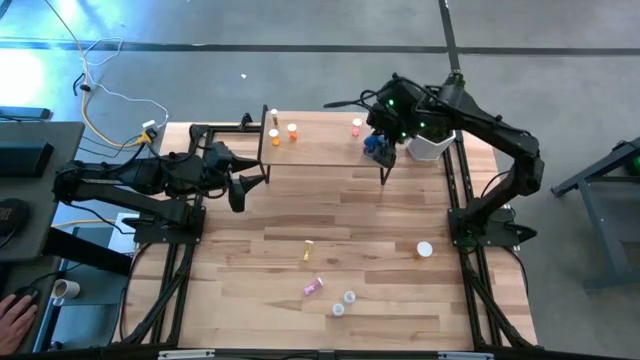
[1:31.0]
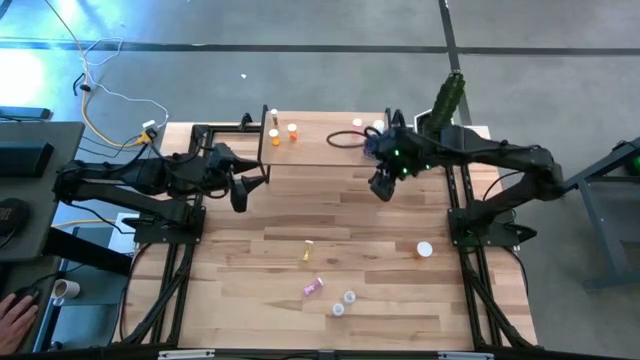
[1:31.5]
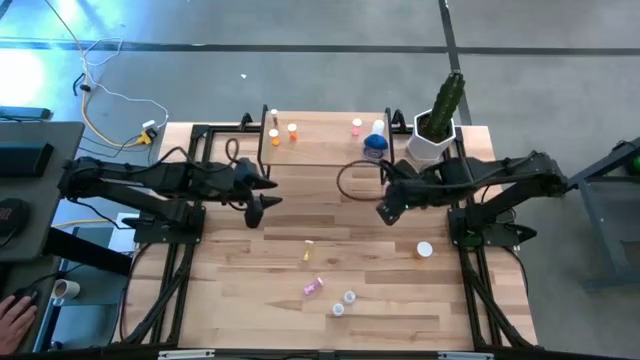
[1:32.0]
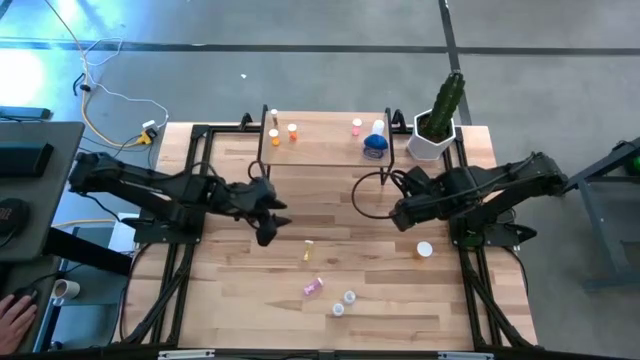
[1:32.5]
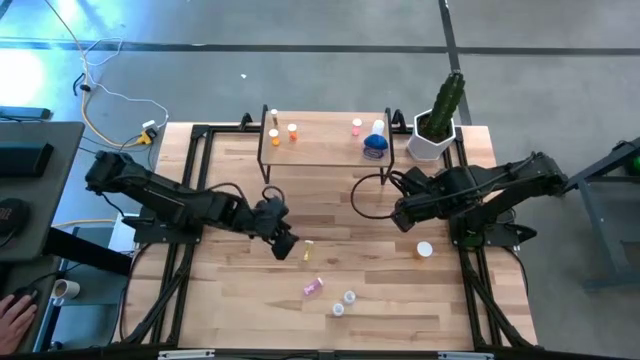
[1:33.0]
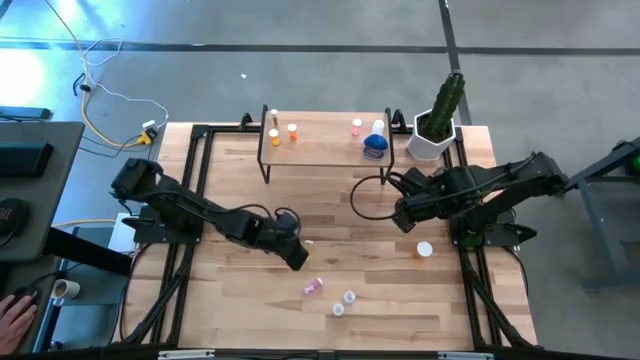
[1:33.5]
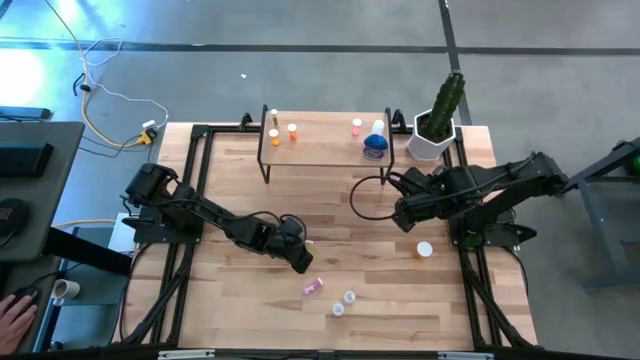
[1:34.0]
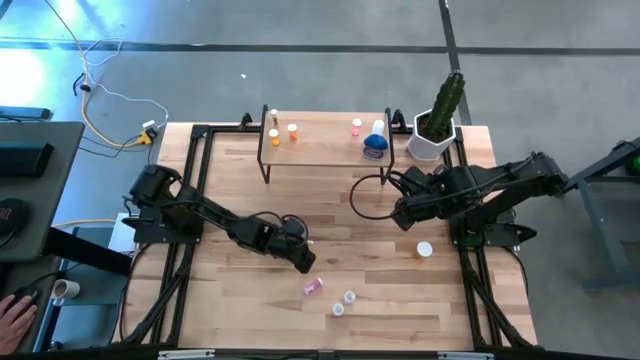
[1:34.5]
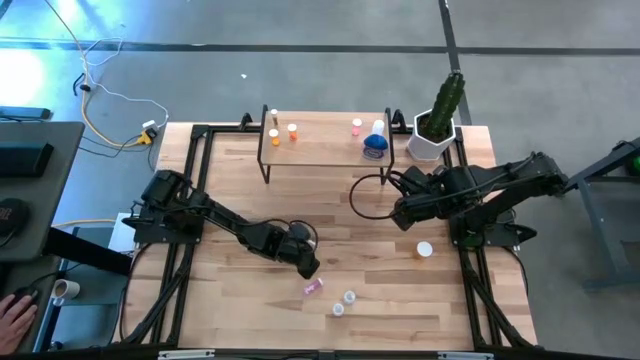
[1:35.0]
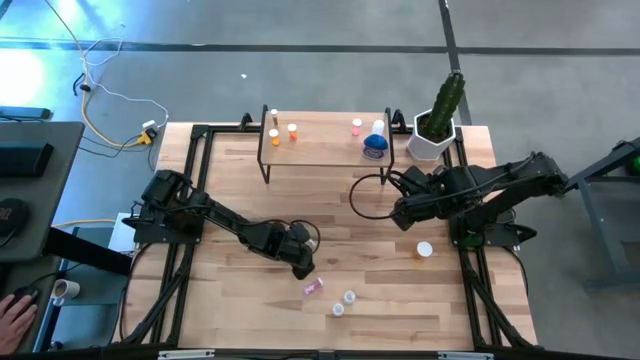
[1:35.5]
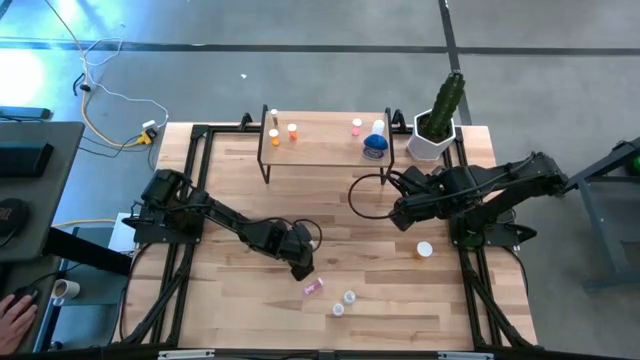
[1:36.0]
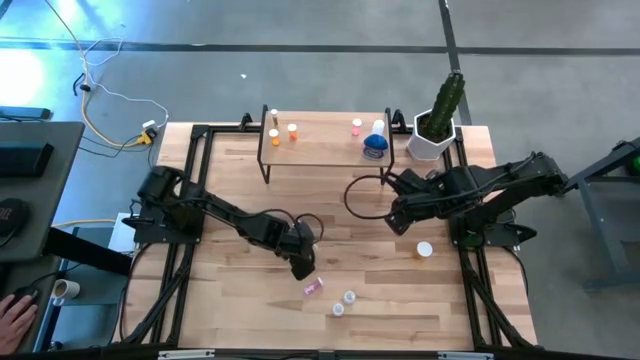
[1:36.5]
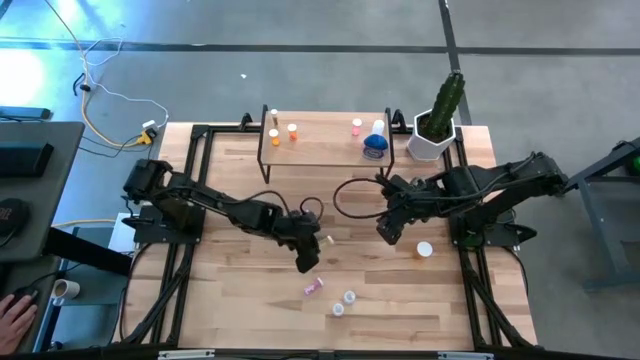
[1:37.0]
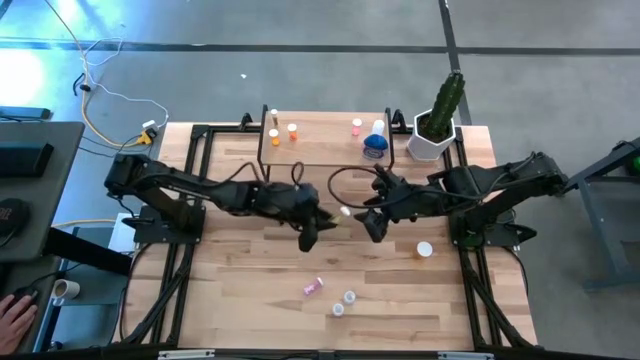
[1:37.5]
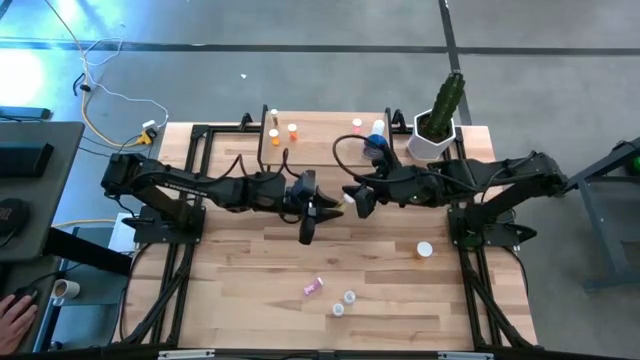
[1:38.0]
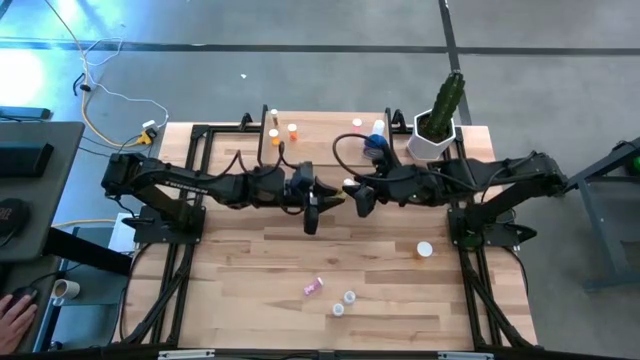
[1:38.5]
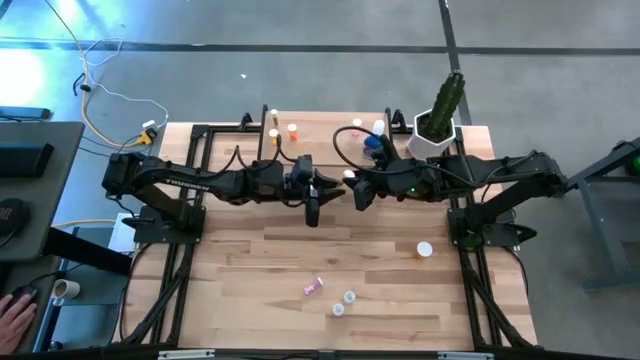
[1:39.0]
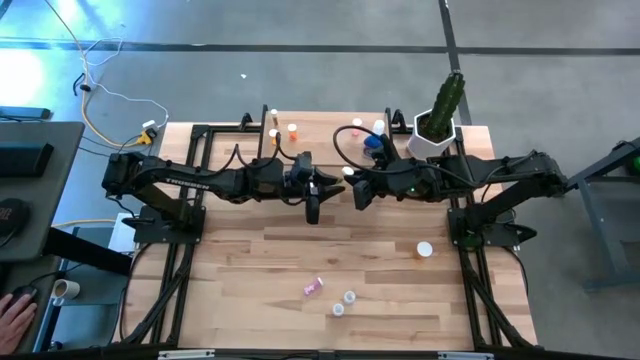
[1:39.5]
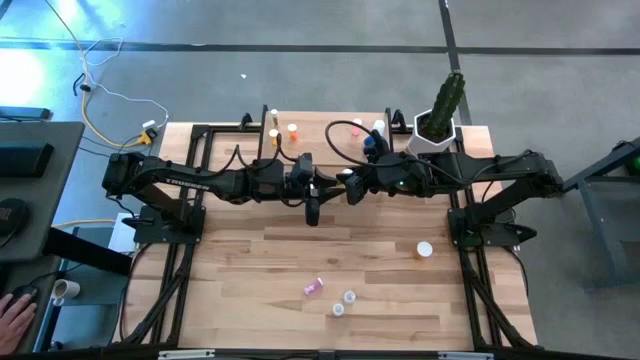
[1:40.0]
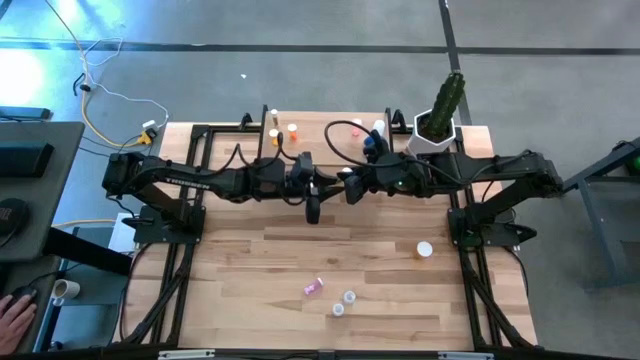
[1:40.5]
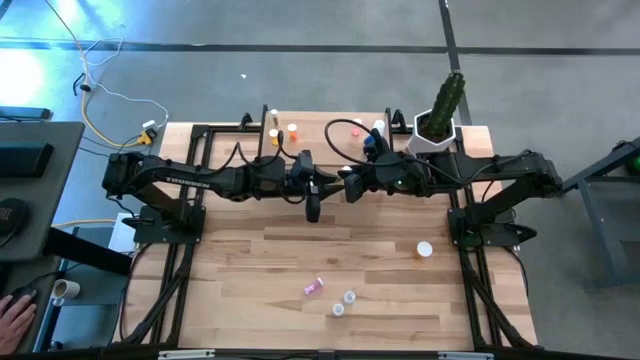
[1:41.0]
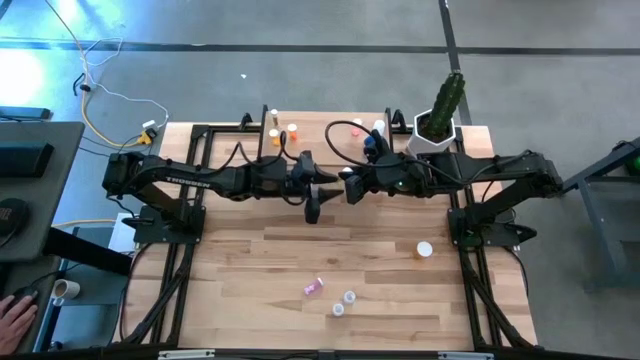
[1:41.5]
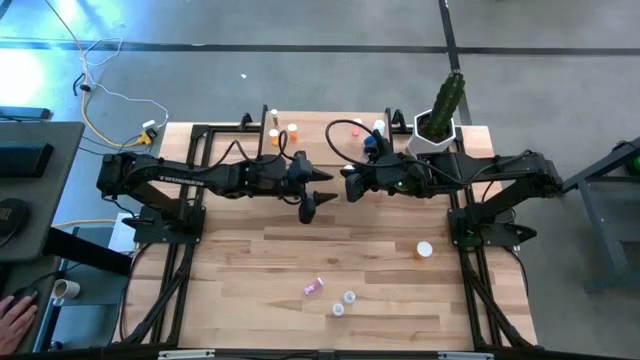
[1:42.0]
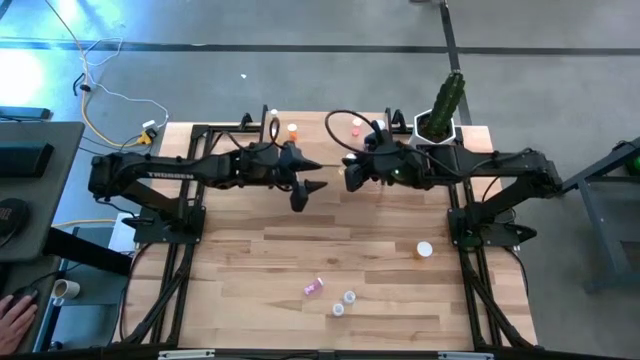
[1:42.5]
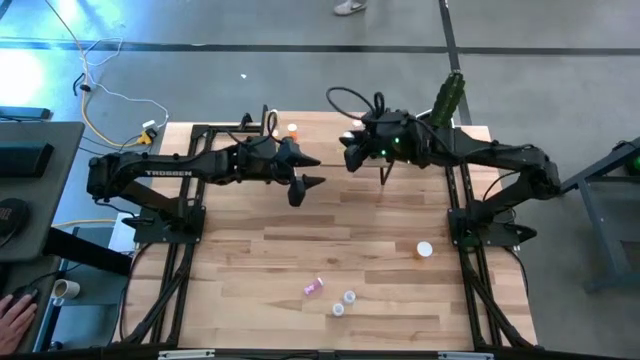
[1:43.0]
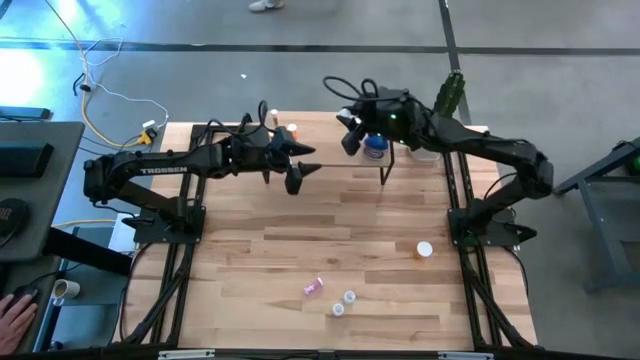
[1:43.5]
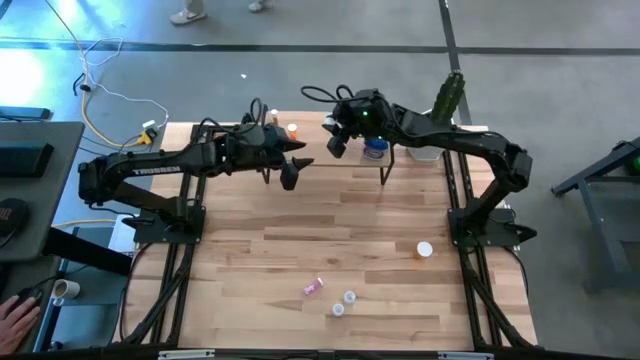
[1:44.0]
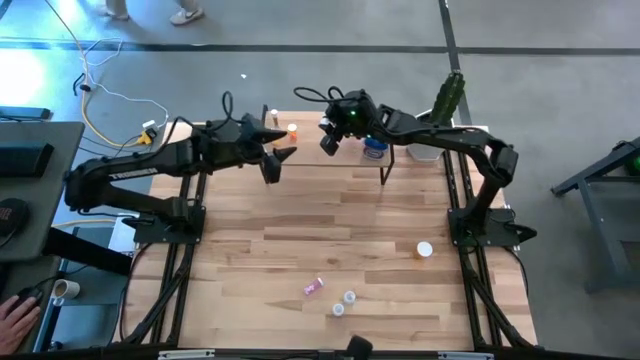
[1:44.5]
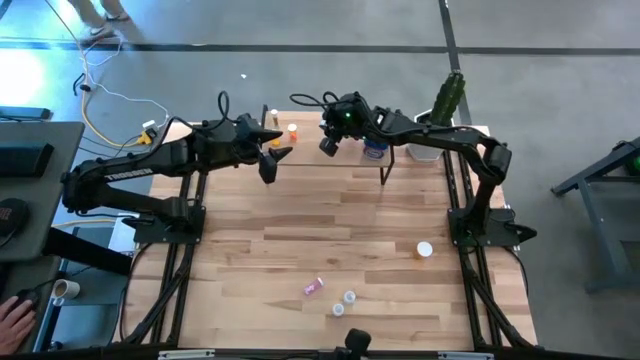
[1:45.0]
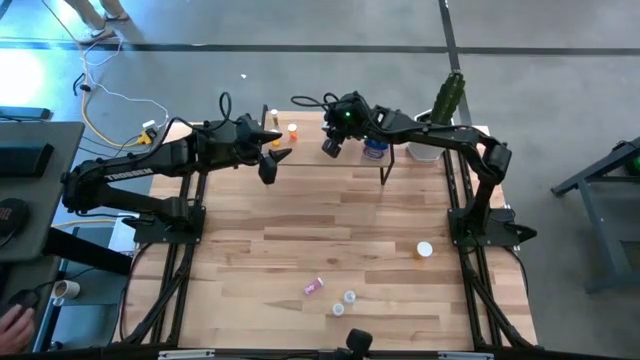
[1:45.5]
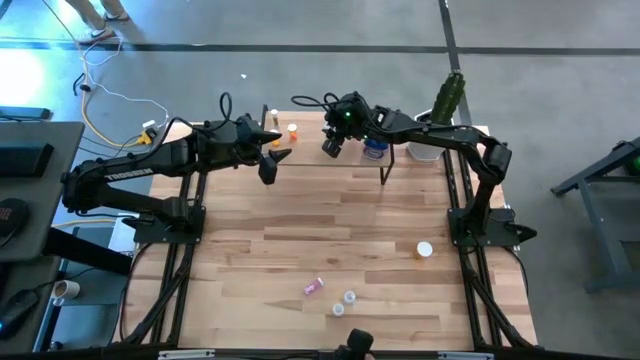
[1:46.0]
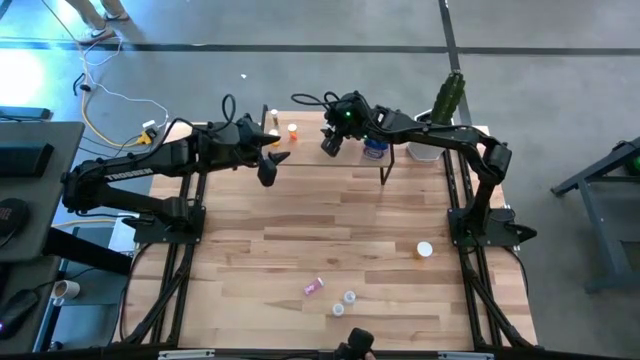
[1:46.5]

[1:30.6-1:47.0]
Task: Pick and place medicine bottles onto shelf by color
Put the yellow pill bottle on the shelf

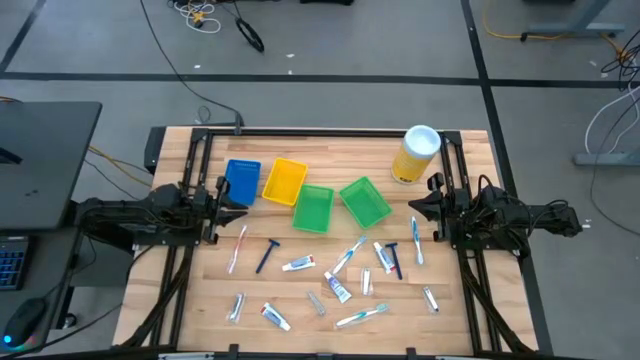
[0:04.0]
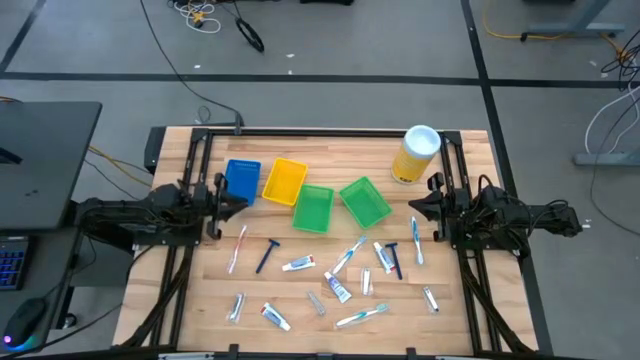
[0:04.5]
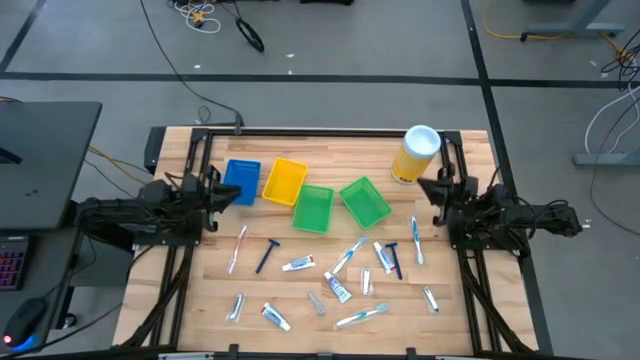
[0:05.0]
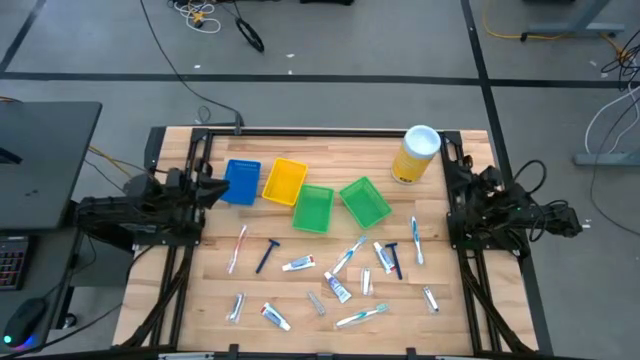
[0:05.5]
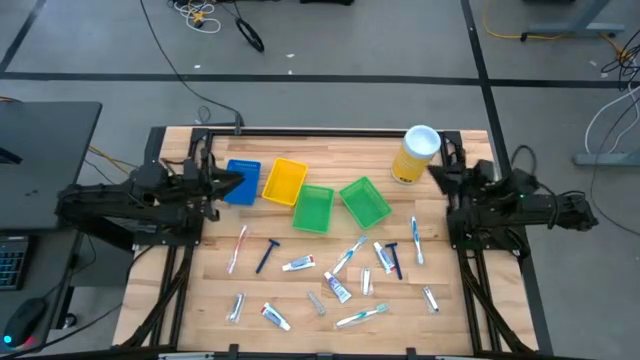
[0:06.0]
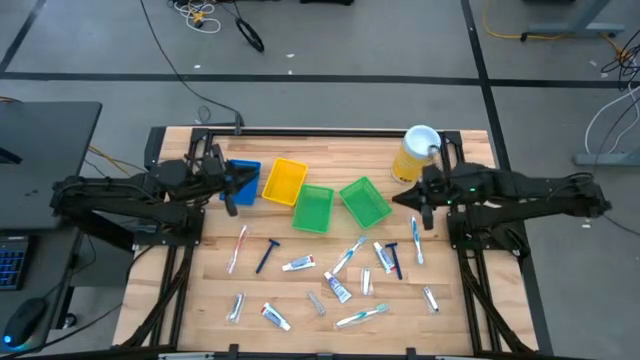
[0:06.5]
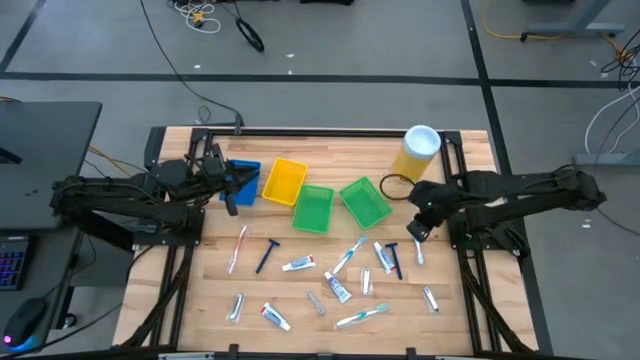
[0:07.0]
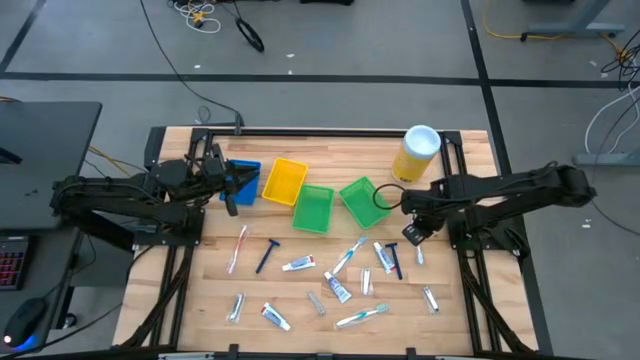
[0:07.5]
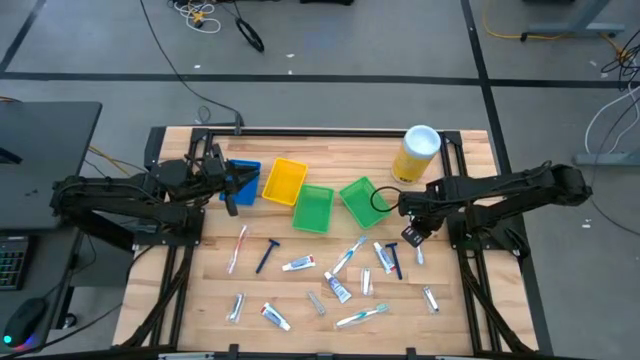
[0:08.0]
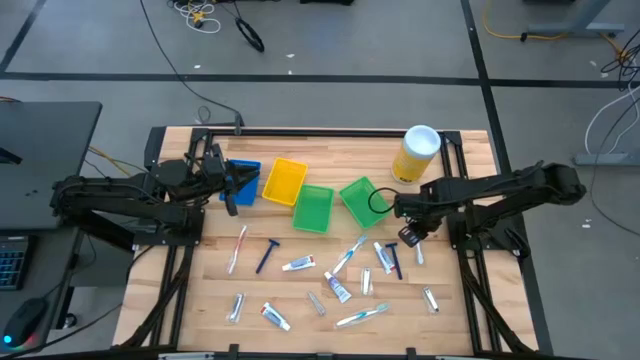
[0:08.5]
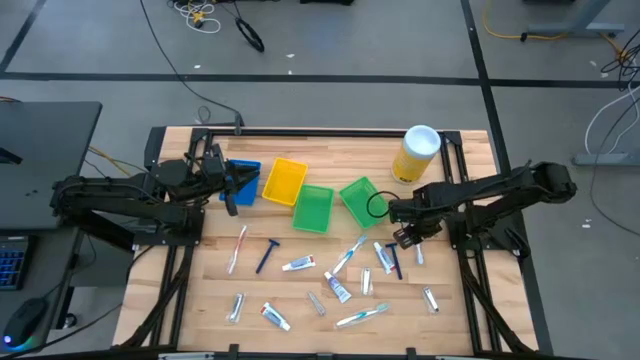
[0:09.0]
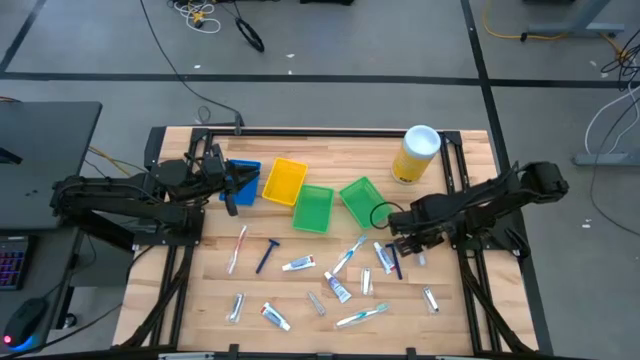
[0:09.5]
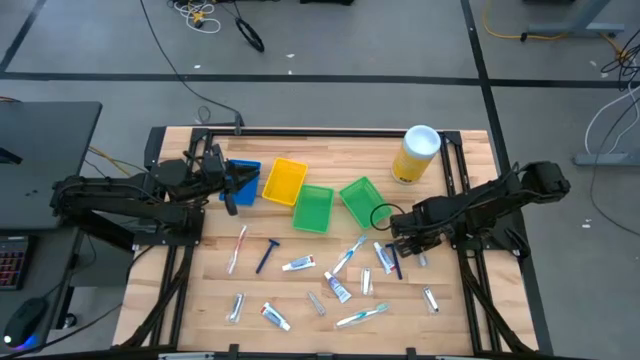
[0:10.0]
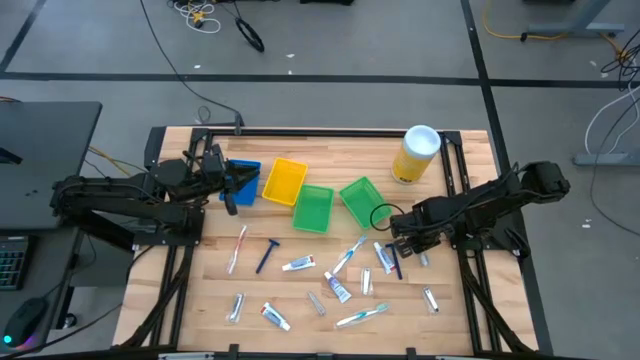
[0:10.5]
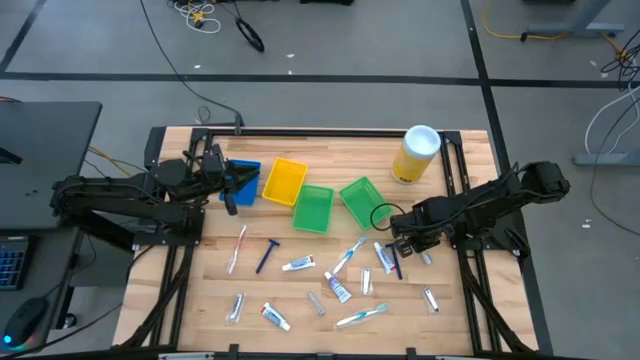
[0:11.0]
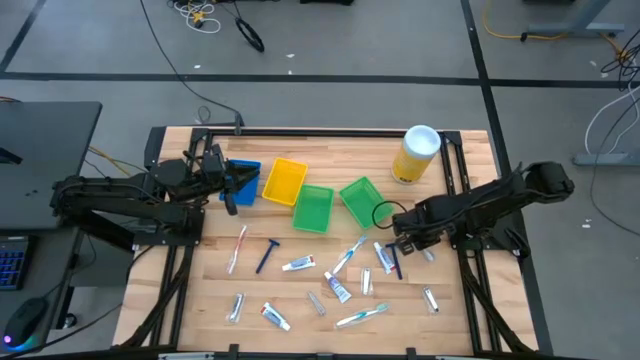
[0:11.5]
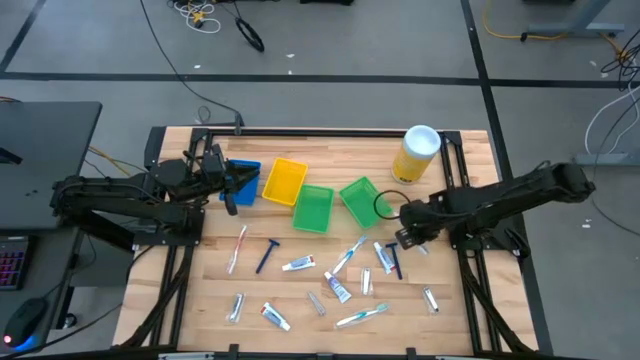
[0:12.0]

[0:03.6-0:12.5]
Task: Pick & Place Travel size toiletries
Put the blue toothbrush into the right green bin
